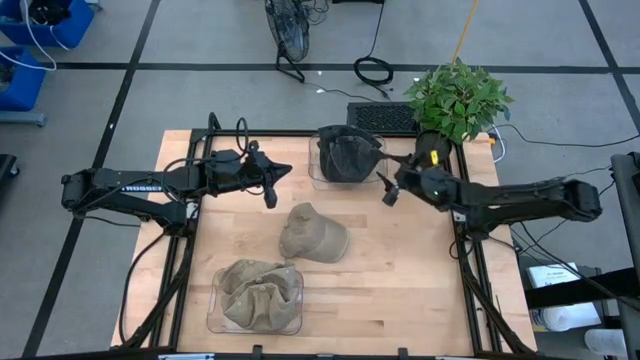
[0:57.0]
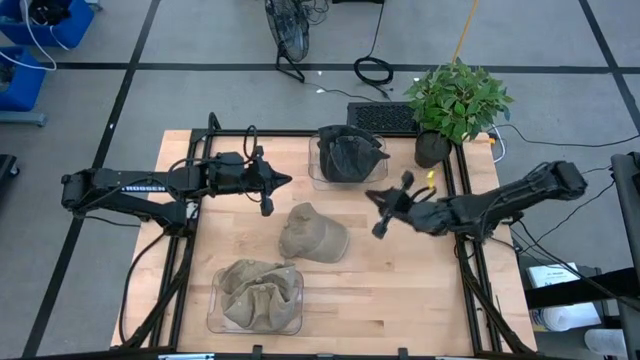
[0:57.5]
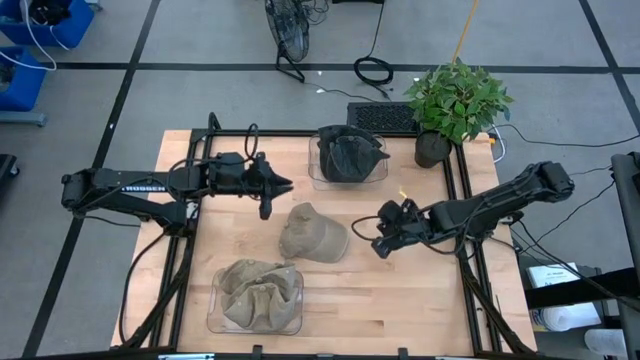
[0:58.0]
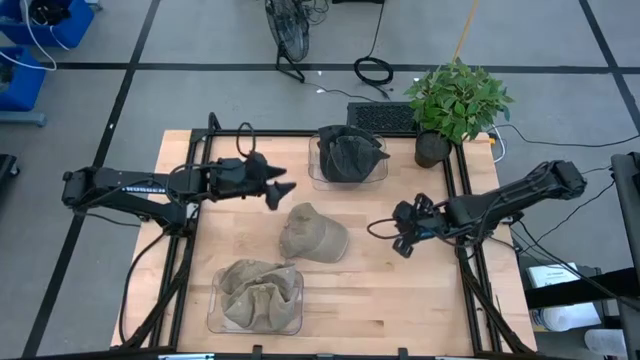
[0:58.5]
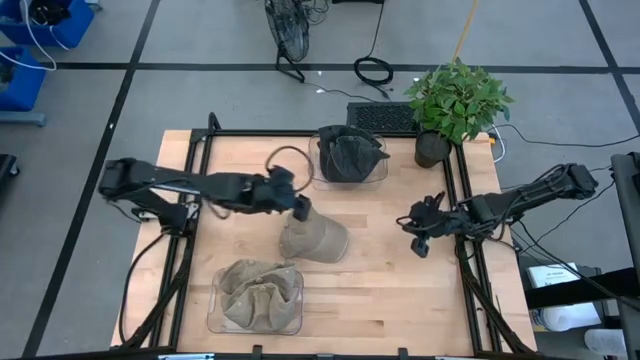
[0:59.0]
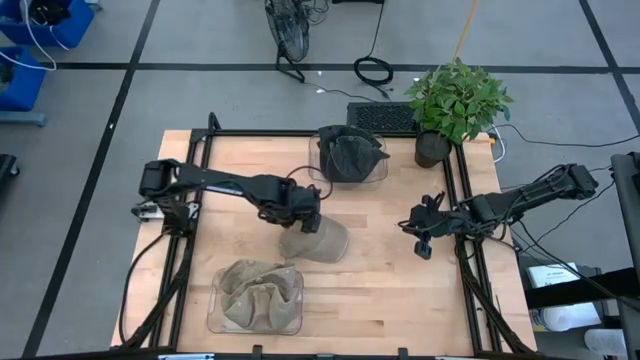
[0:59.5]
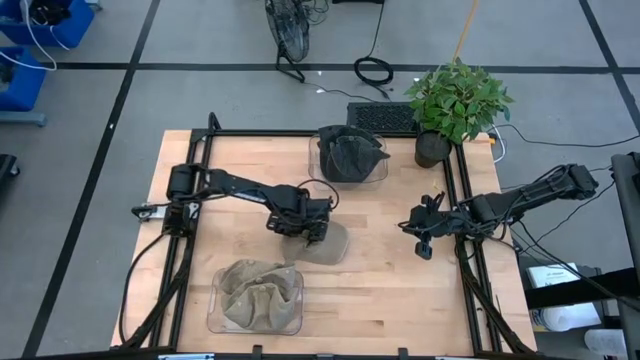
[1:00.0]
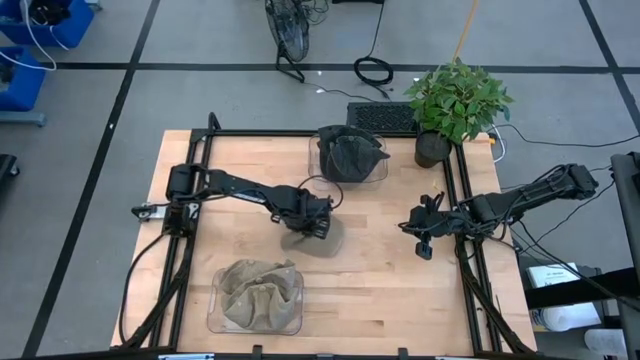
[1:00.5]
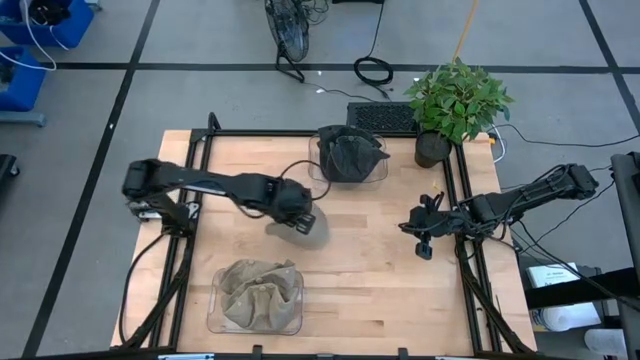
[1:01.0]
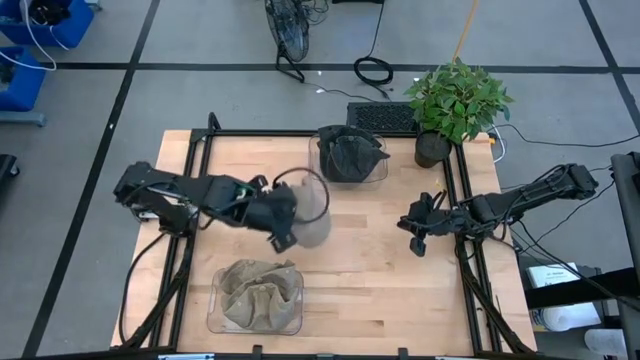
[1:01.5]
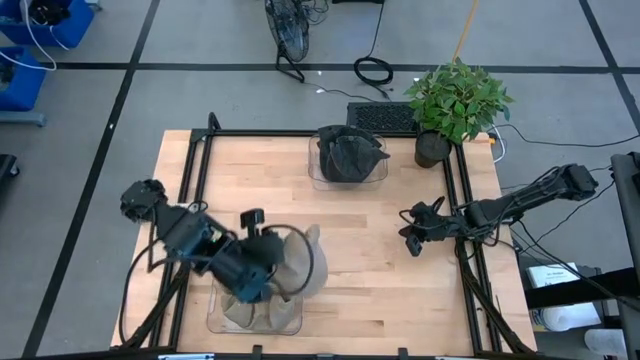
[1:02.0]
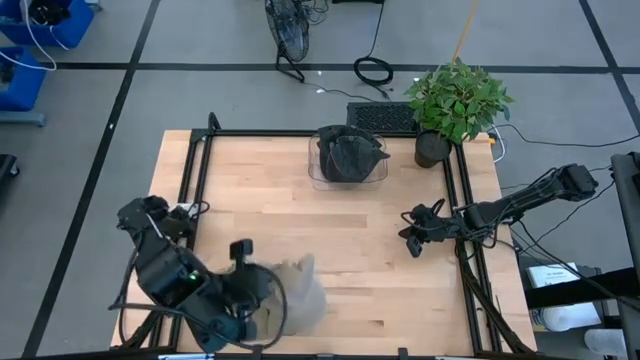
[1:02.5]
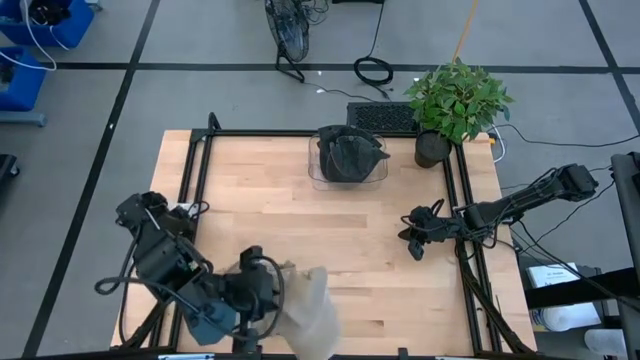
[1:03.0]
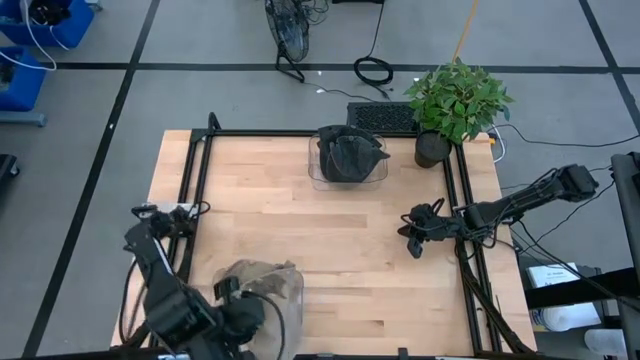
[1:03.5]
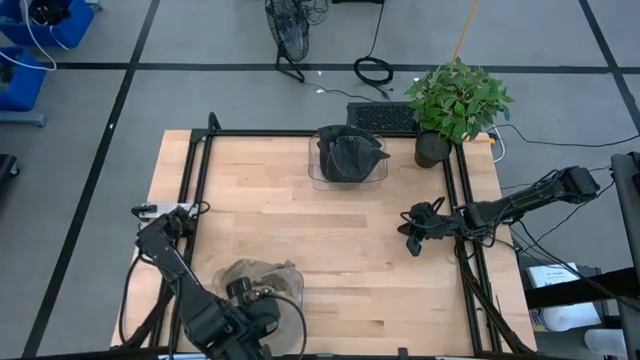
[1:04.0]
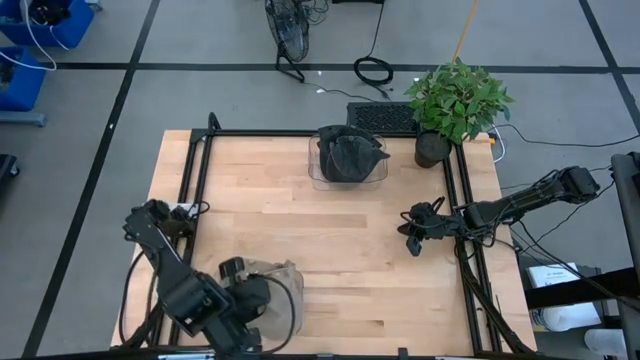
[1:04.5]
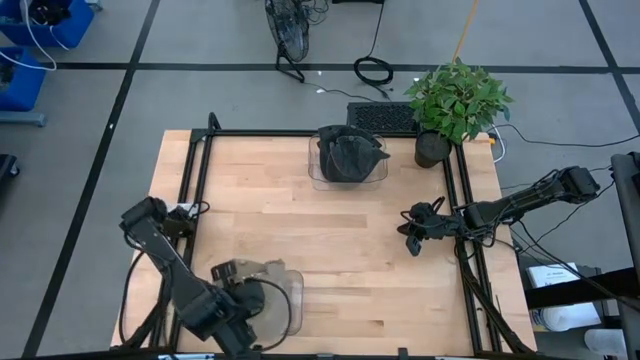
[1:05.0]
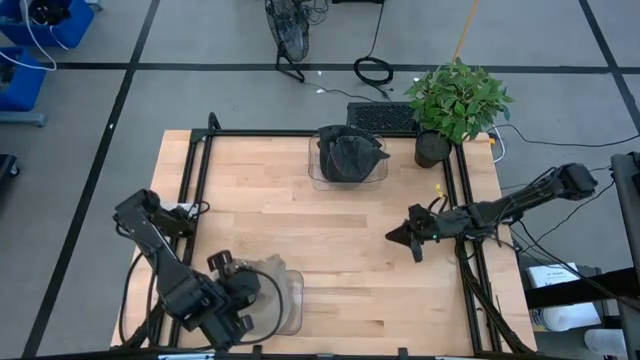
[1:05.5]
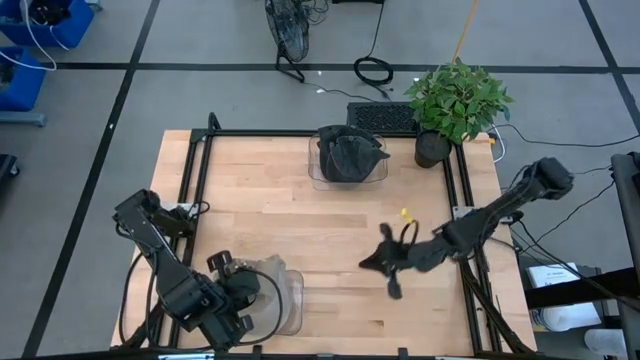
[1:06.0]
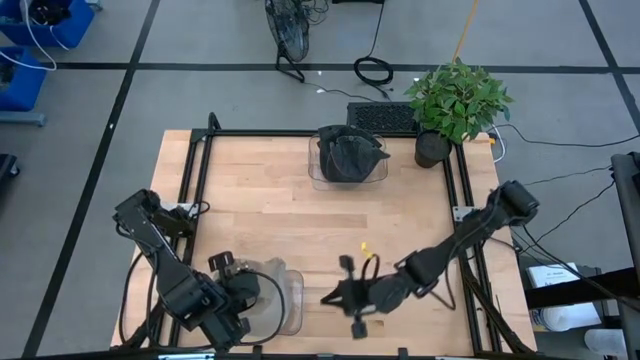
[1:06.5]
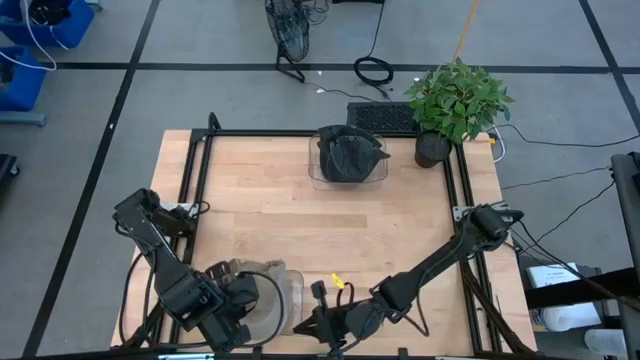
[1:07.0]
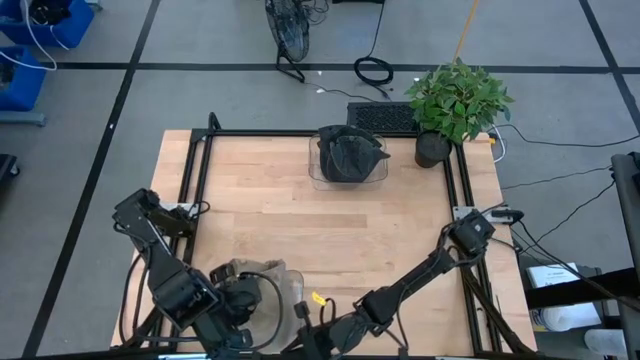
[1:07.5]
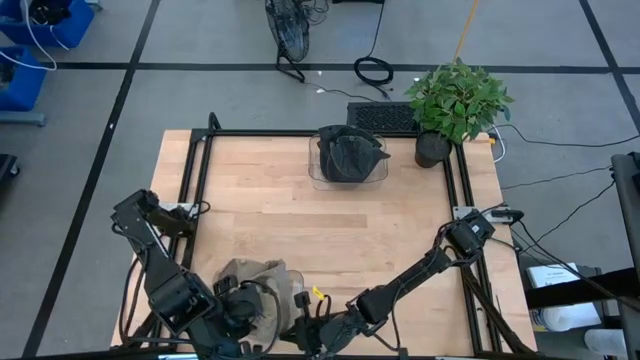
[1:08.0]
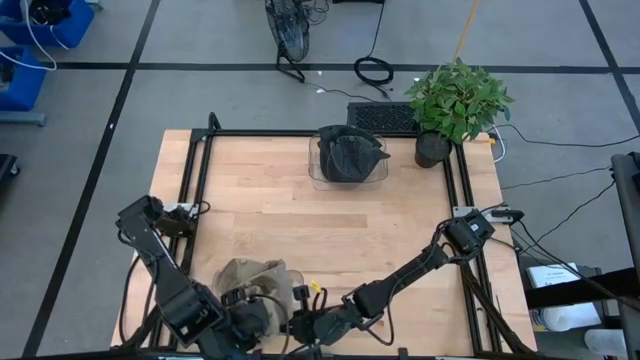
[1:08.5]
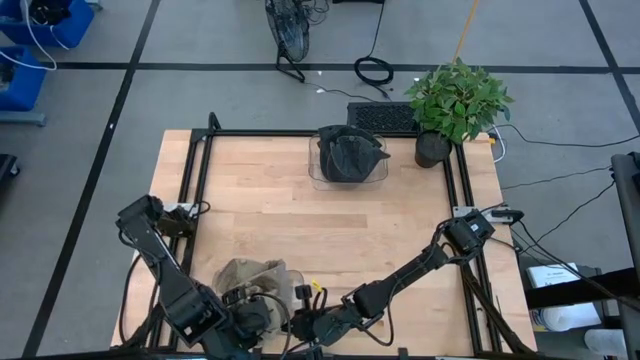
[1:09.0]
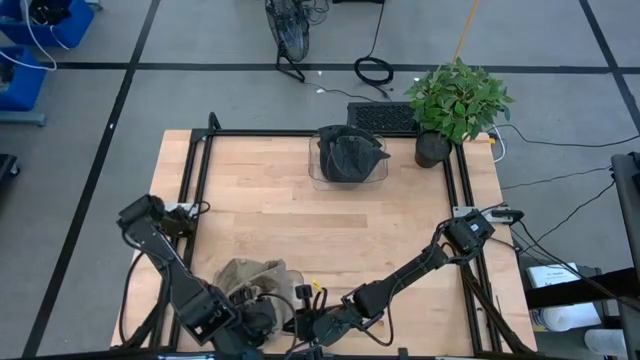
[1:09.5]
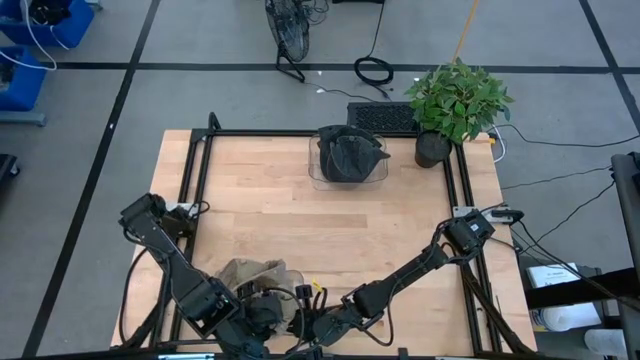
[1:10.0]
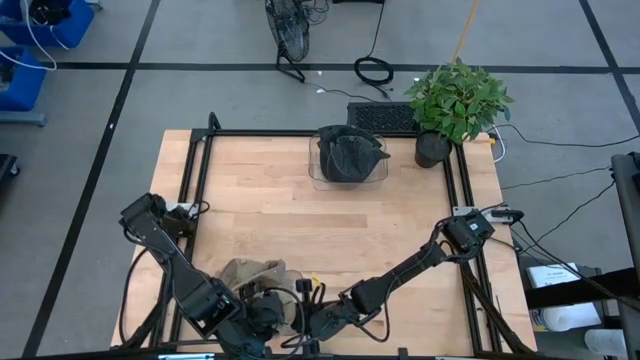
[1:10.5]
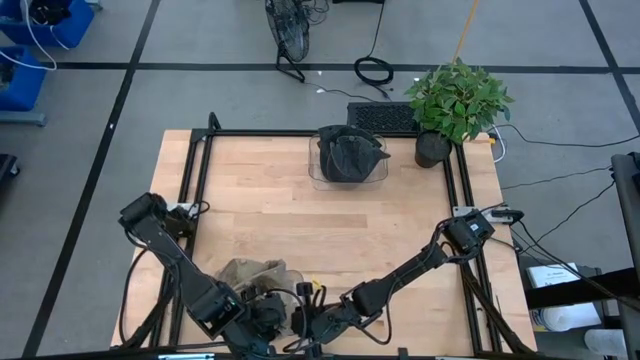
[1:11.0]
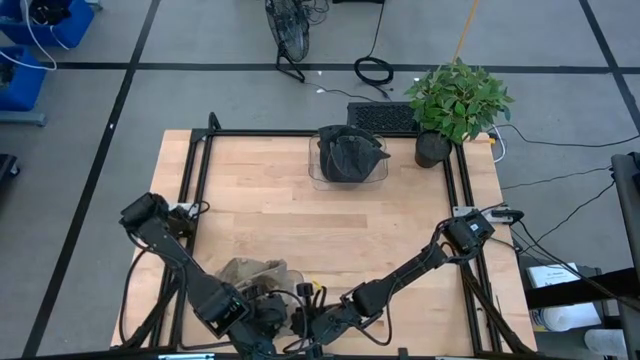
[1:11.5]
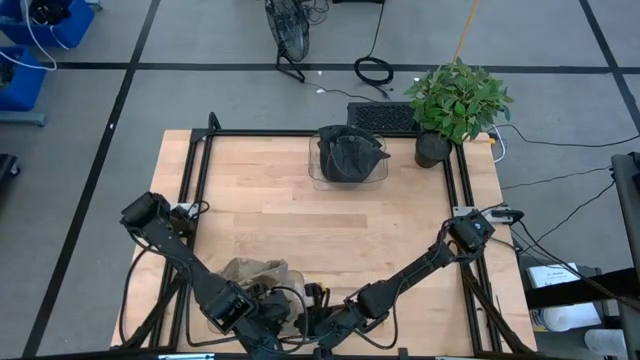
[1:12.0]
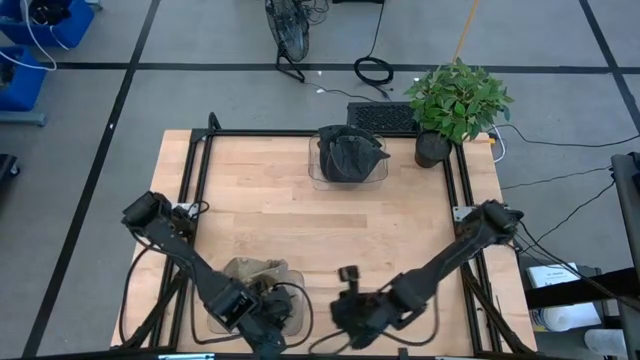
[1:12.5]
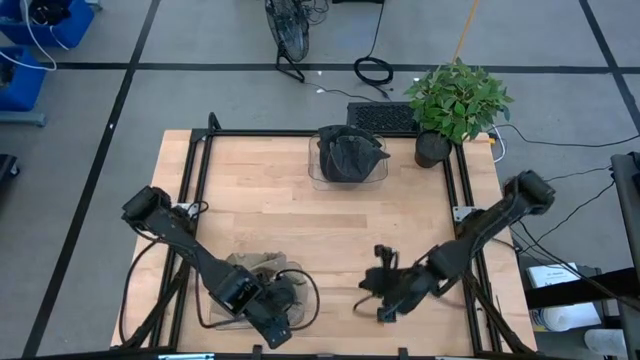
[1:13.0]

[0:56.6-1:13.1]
Task: Pick & Place hat
Put the brown cap into the bottom transparent bin

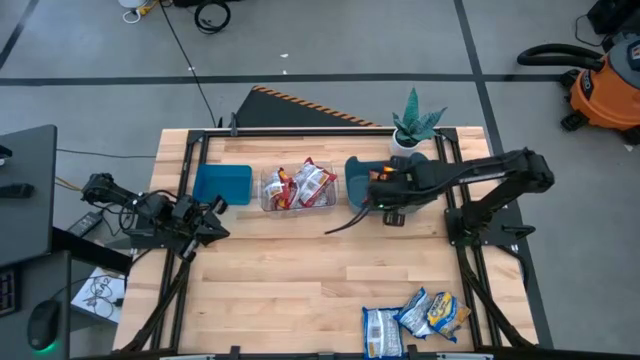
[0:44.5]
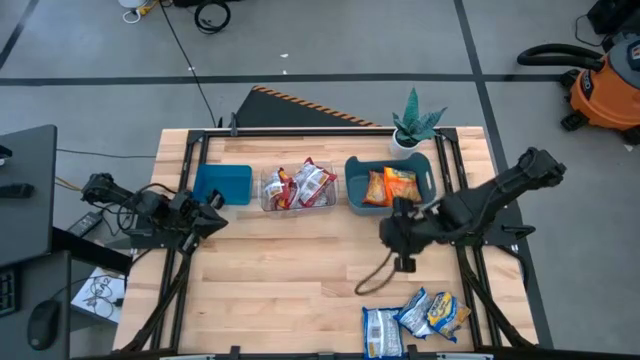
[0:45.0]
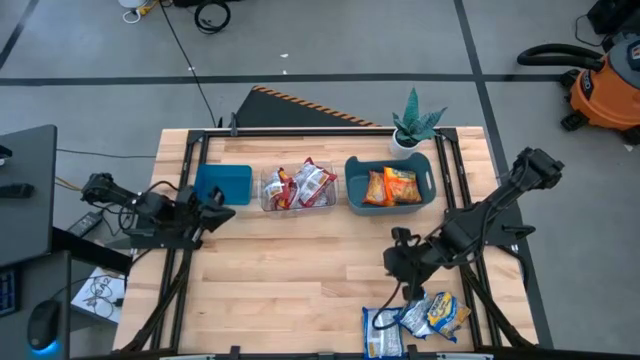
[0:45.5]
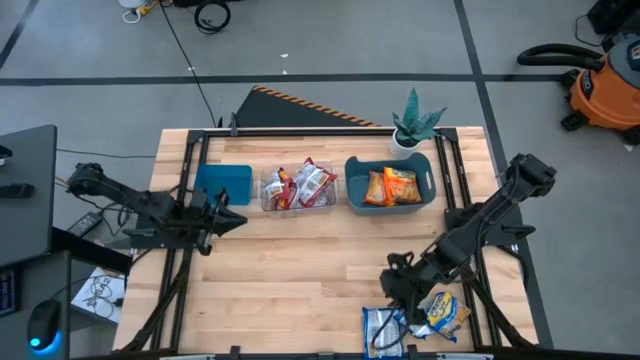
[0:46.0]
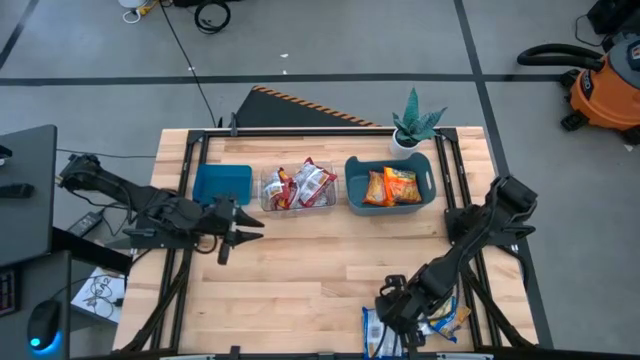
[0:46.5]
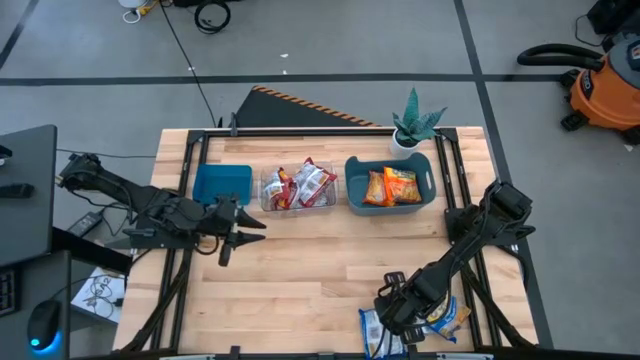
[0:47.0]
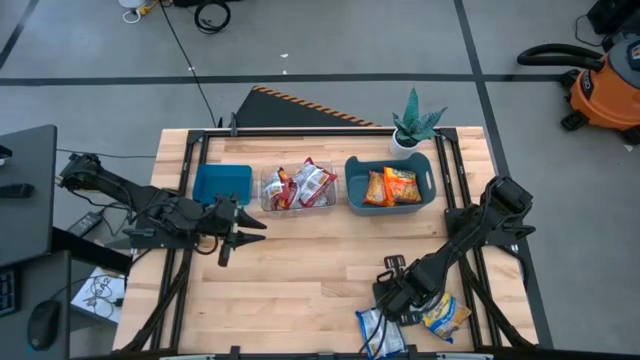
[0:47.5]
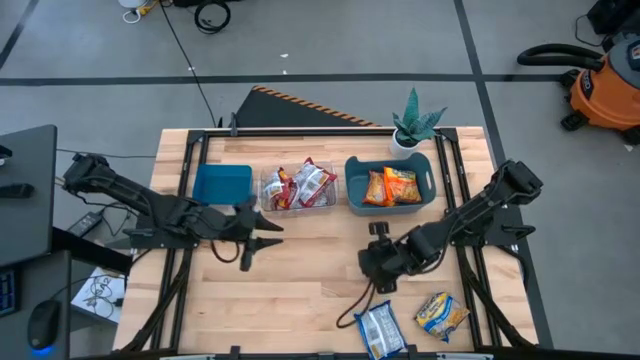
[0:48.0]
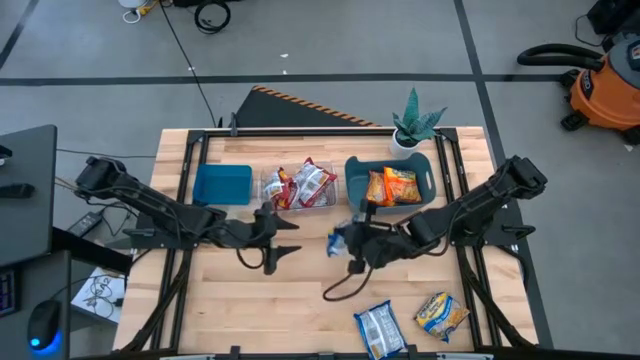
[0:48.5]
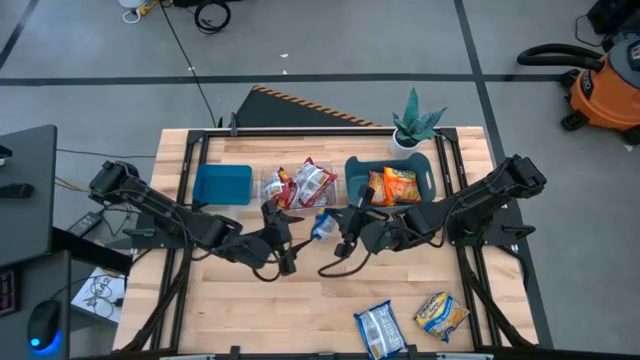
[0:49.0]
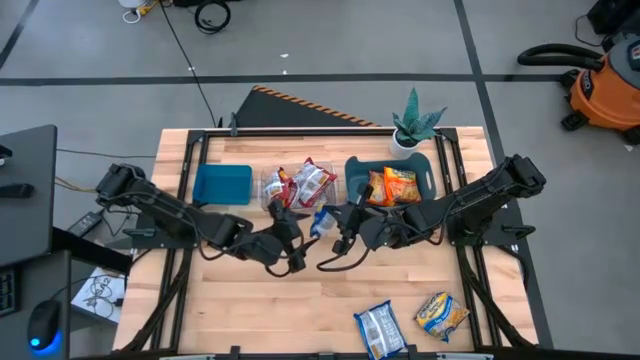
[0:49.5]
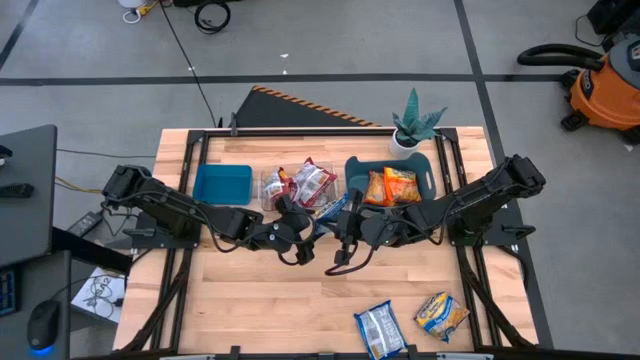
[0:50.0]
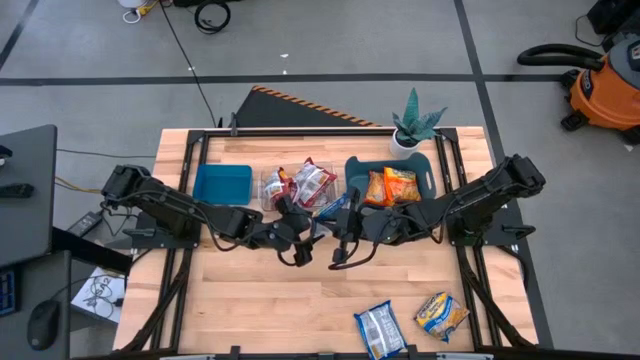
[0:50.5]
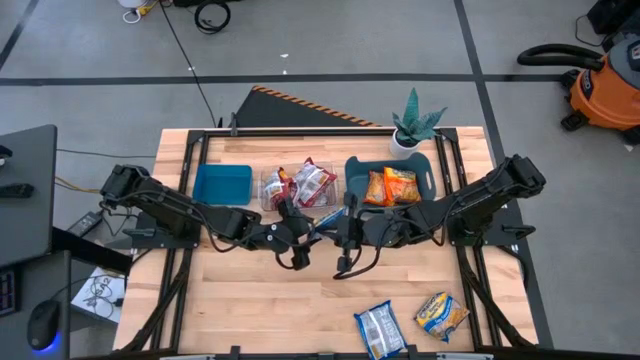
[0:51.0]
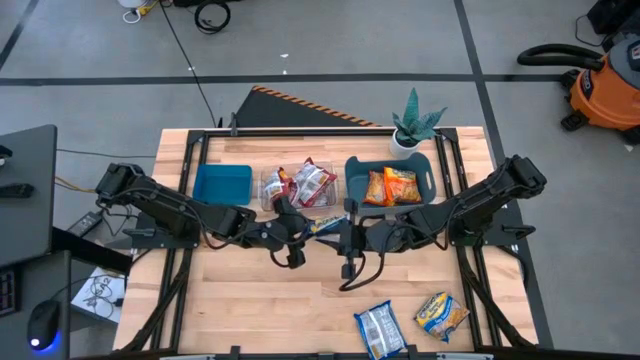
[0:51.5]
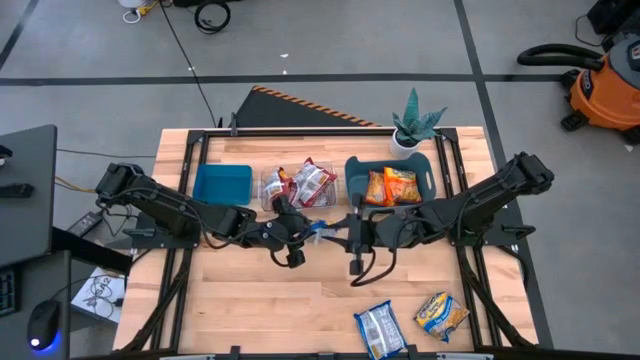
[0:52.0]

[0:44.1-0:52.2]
Task: Sort Maruchan noodles
Put the blue noodle pack into the blue bin
